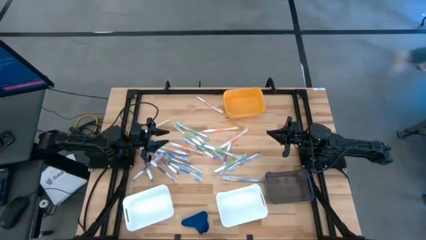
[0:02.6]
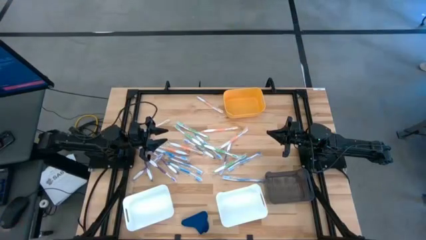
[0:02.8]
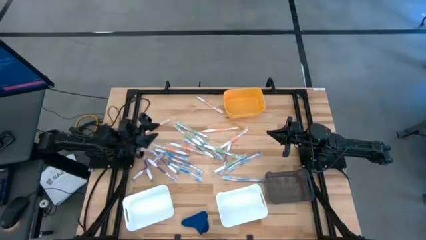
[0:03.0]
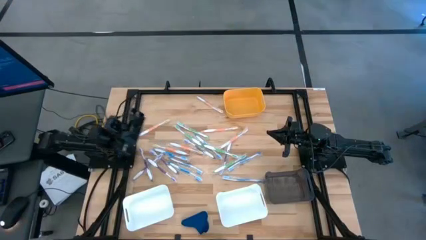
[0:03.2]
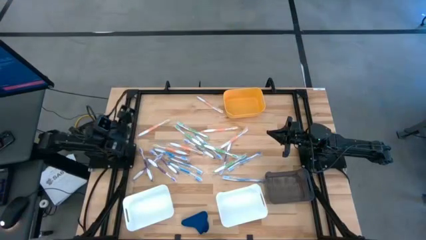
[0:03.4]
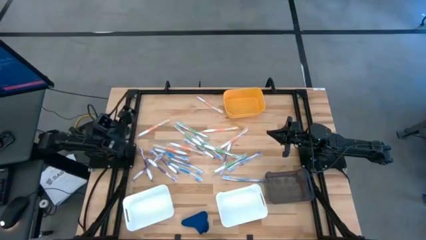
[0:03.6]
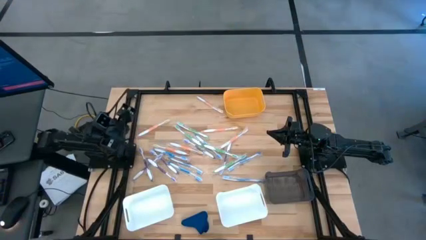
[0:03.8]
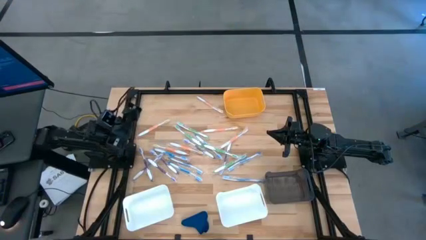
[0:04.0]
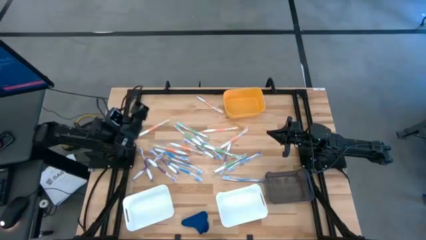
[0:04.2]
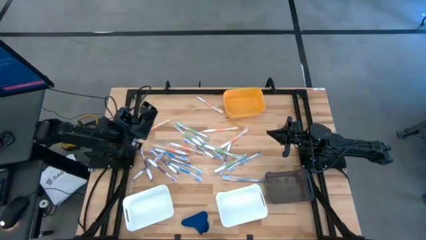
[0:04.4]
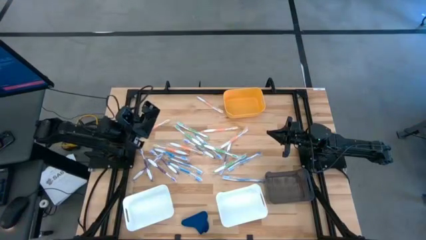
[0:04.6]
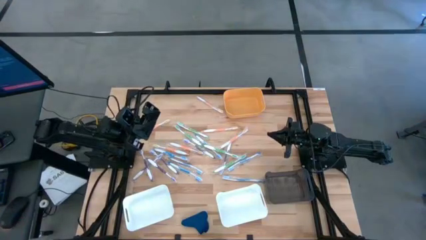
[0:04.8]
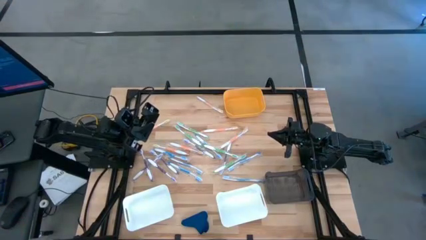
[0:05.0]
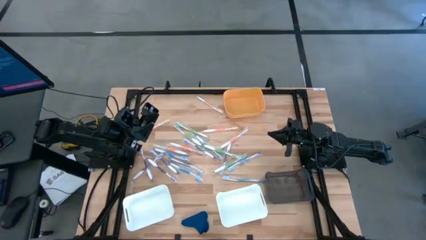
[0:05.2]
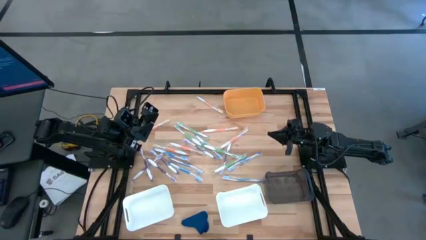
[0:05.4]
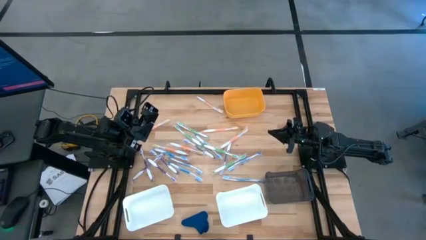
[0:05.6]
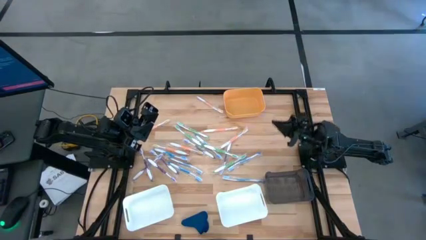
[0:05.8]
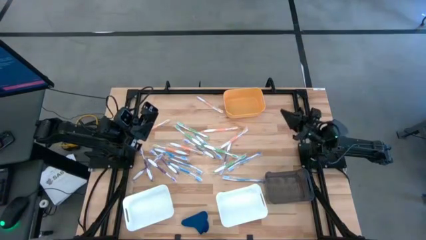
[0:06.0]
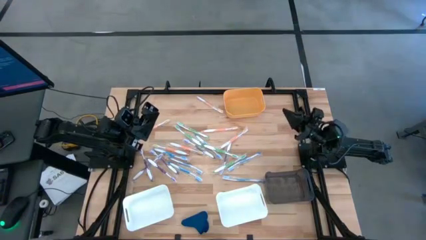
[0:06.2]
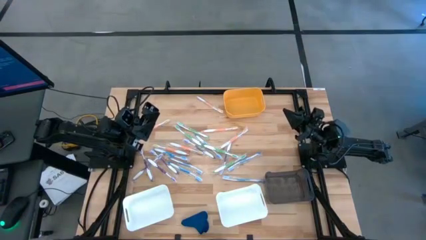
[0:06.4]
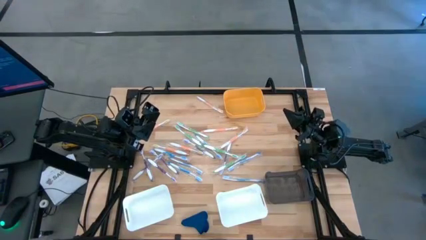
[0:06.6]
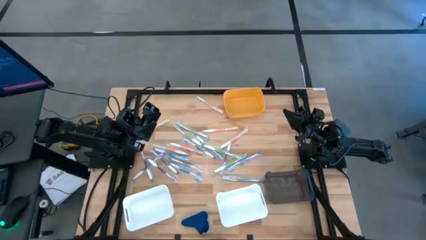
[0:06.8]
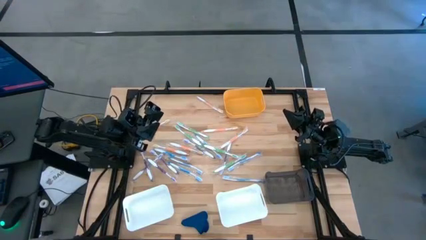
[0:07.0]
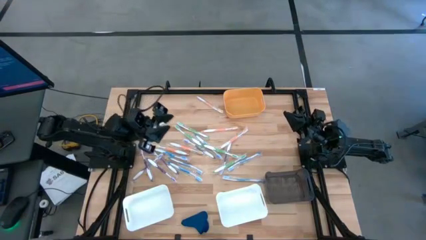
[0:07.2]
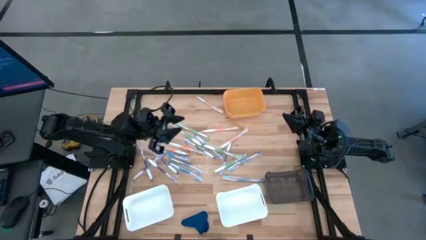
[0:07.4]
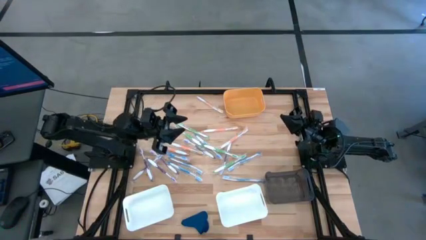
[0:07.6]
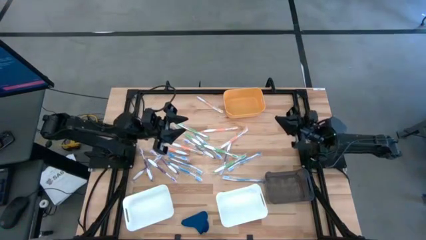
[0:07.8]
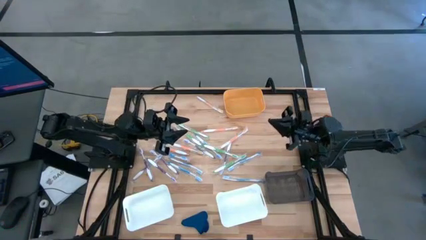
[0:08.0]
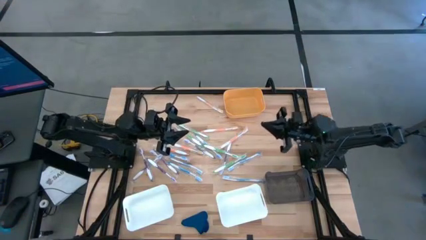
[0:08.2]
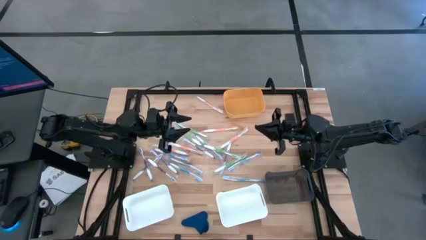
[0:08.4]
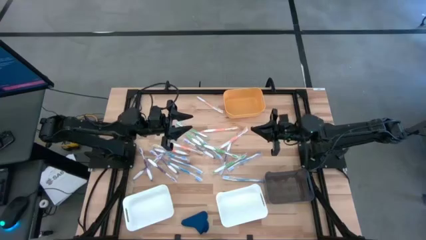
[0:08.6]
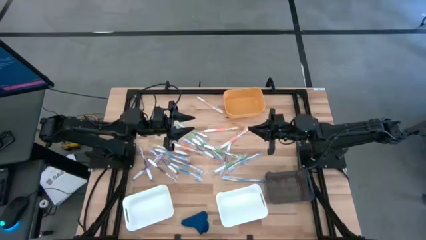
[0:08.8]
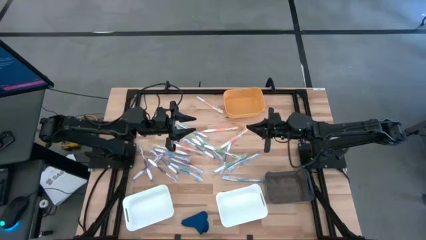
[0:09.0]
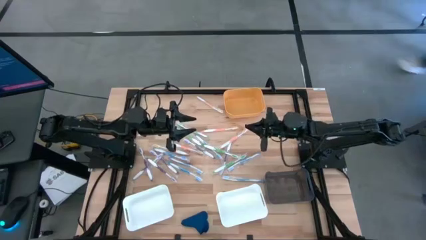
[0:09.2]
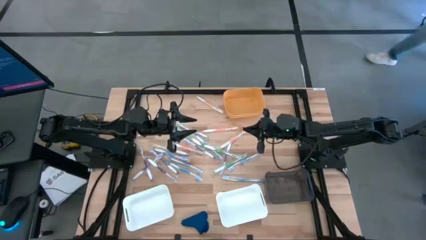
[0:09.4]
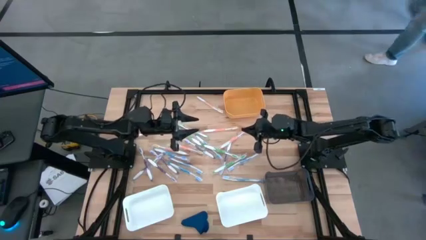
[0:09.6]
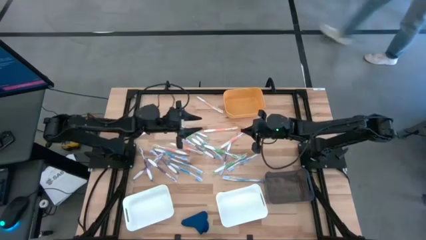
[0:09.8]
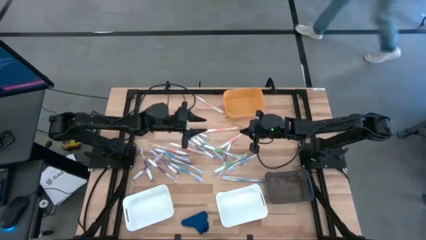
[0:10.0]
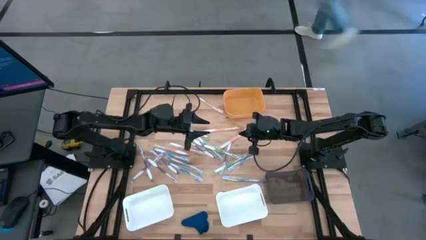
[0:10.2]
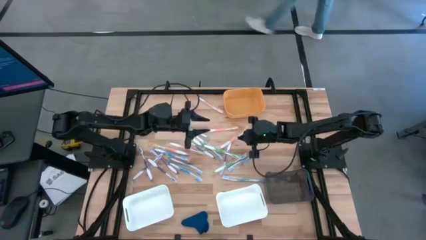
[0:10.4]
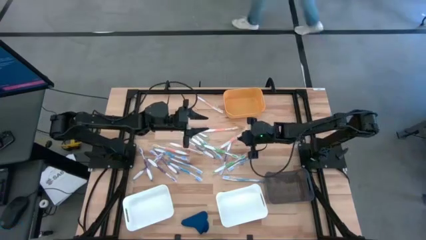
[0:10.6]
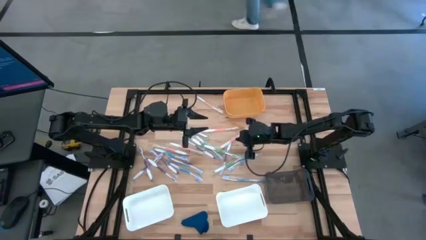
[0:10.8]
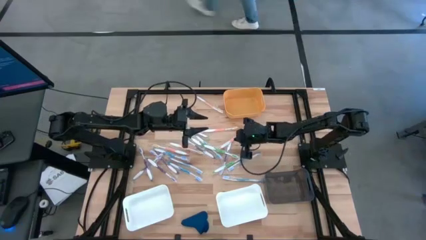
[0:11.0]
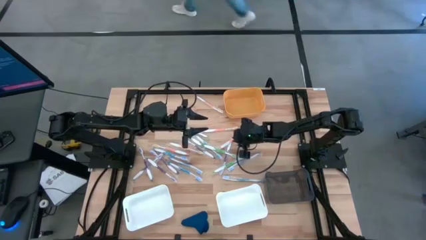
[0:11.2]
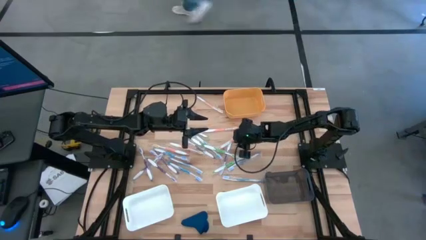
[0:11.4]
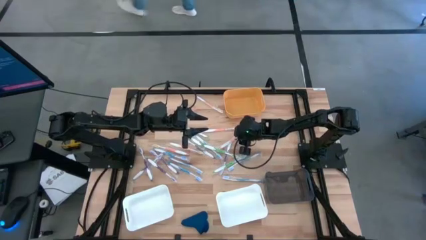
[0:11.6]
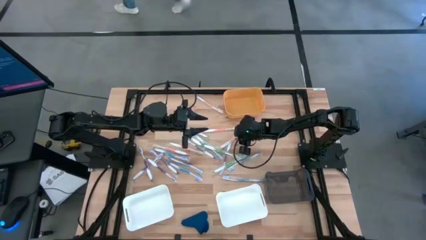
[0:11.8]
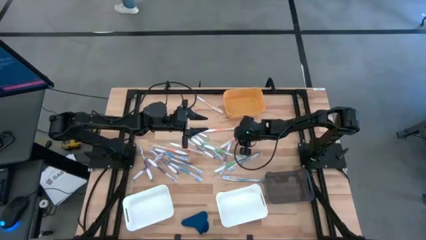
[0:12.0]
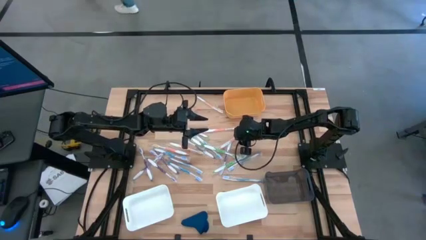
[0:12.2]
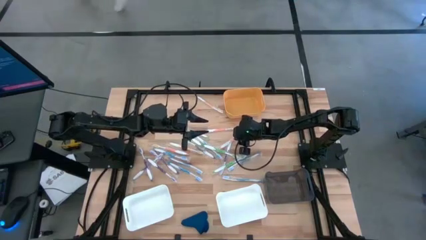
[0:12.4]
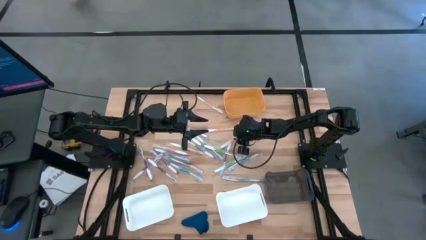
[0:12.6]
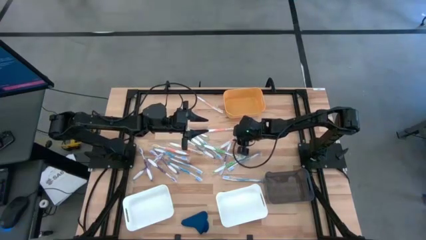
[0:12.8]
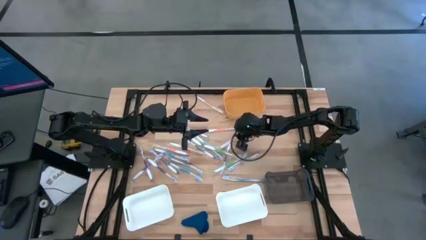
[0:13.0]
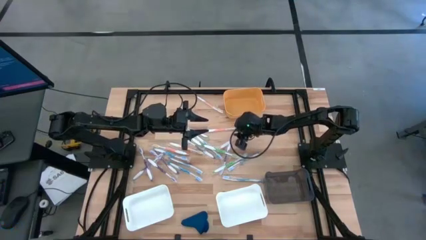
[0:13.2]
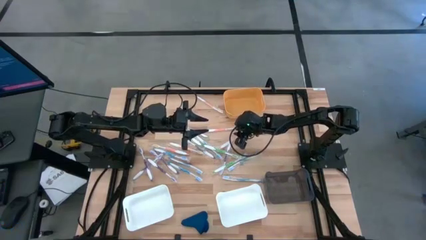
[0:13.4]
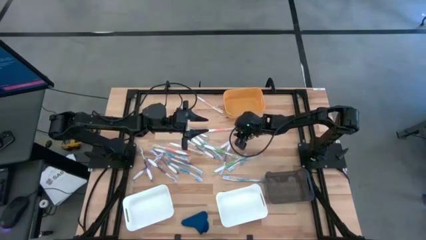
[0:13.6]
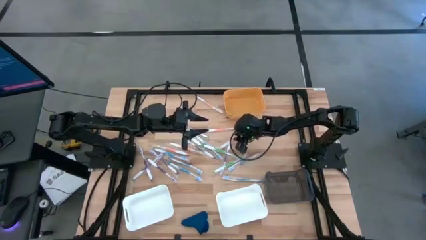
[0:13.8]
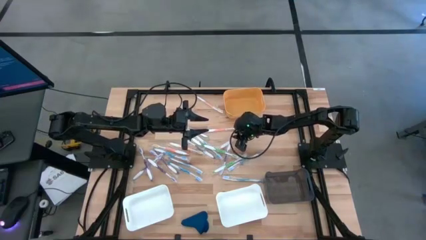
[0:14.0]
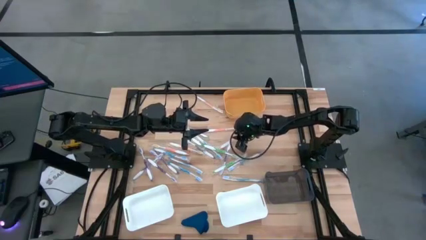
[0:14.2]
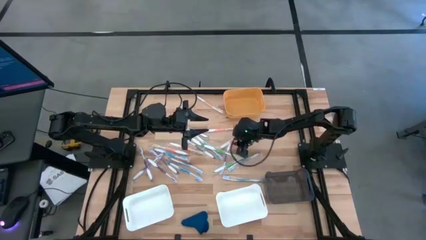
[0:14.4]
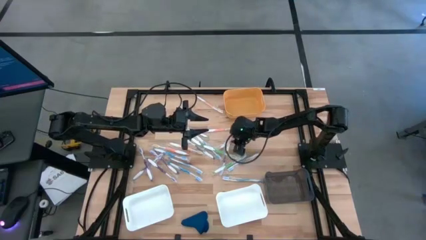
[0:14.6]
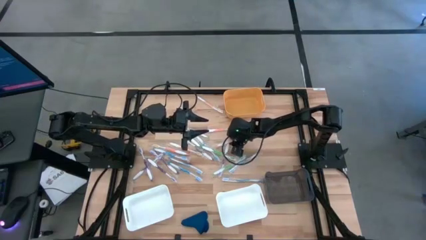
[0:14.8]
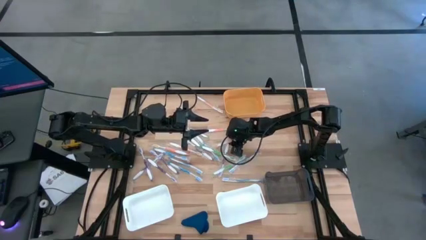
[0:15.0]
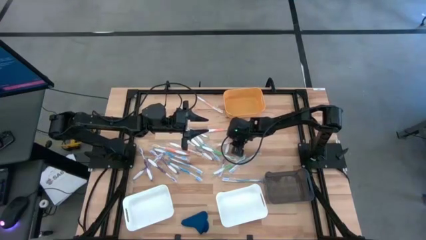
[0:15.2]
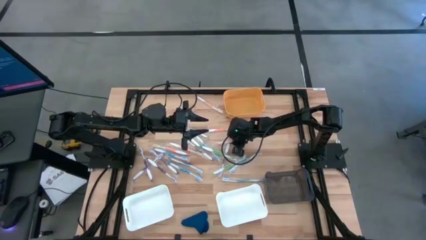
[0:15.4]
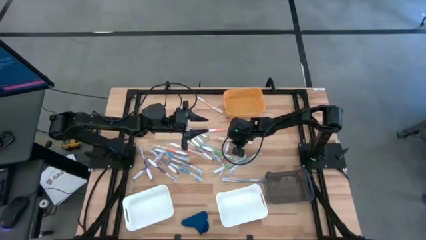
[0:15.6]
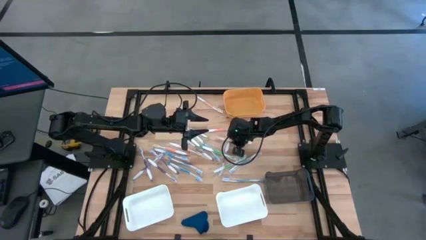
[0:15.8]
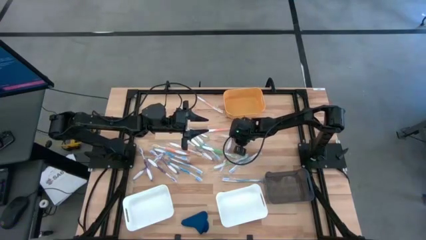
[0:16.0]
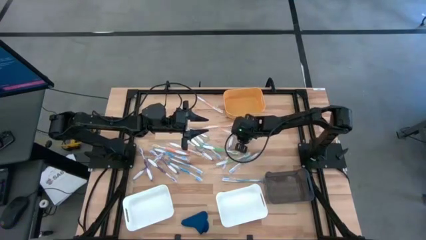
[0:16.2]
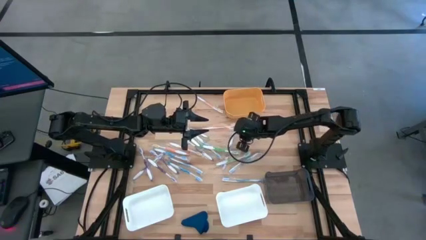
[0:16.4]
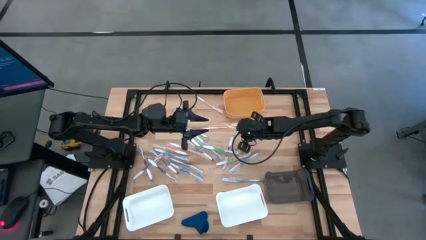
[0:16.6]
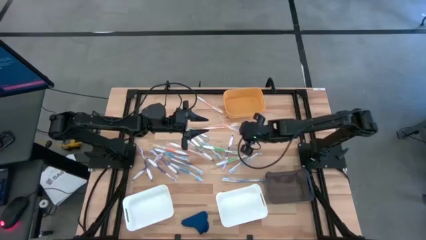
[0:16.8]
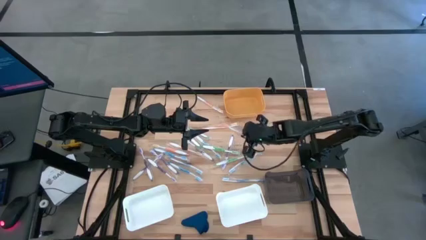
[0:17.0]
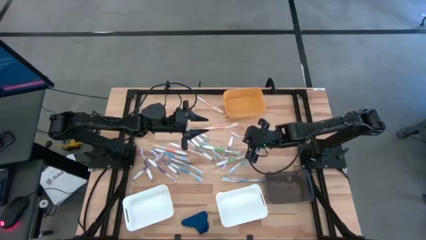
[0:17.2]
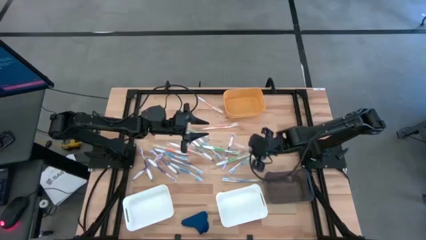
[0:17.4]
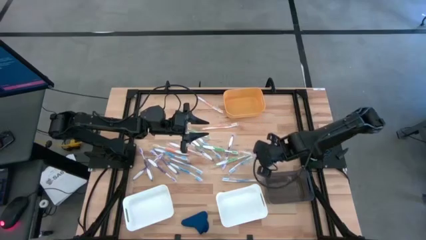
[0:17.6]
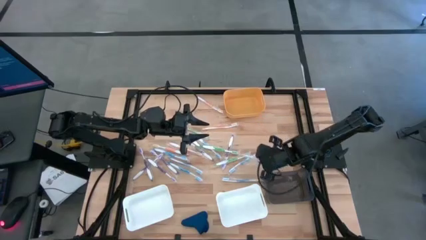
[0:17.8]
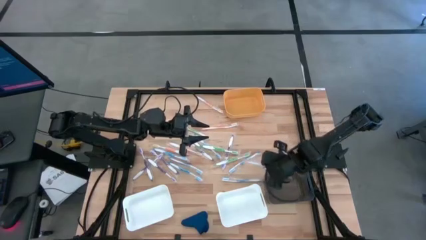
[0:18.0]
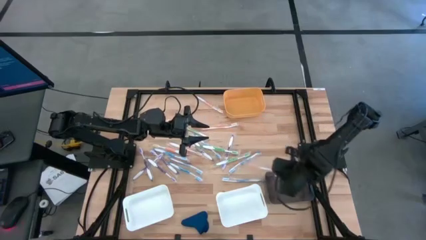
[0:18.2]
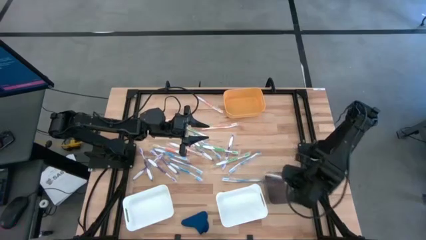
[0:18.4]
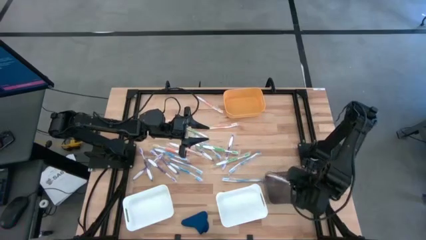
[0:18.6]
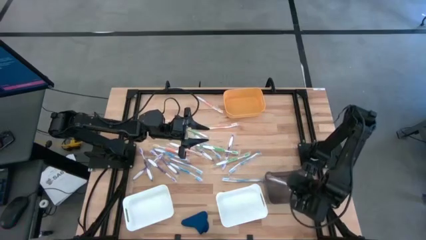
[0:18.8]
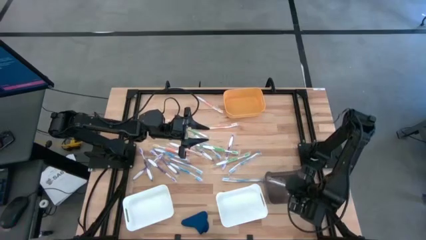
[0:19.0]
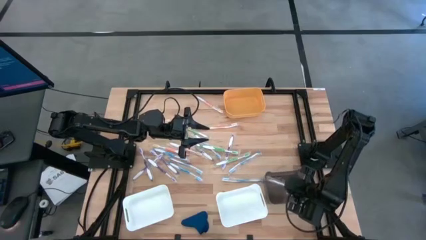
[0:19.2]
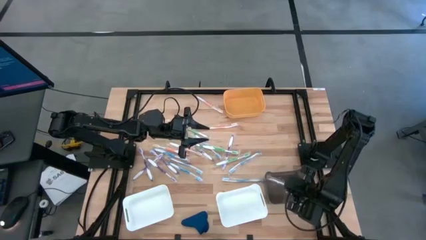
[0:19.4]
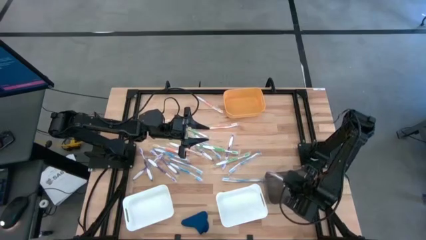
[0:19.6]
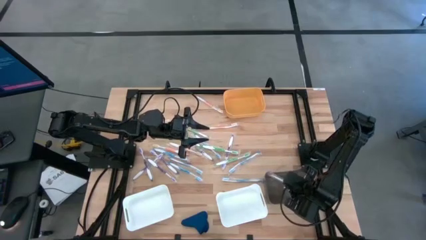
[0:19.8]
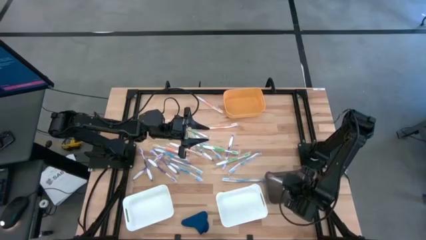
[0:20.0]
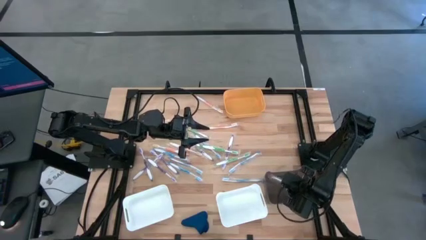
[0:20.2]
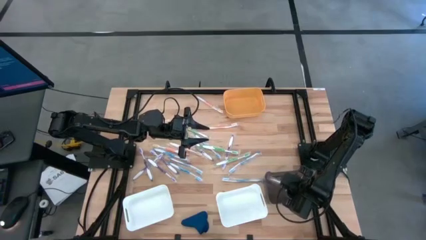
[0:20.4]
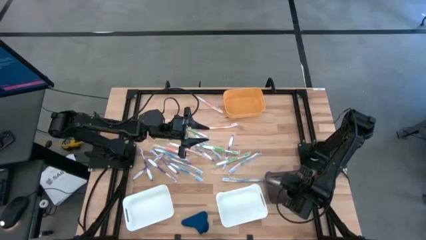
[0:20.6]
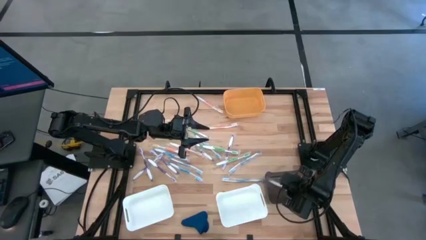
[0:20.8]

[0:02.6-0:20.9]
Task: Pick & Place Toothbrushes
Put the orange toothbrush into the black bin
